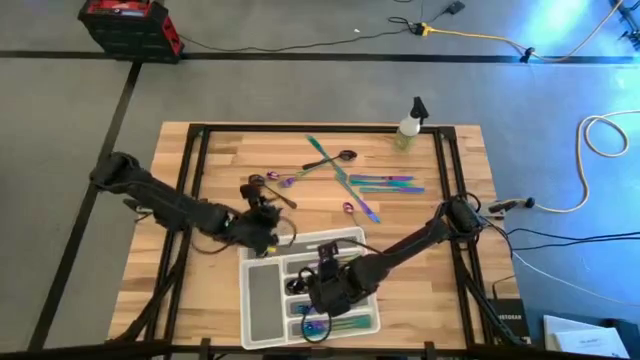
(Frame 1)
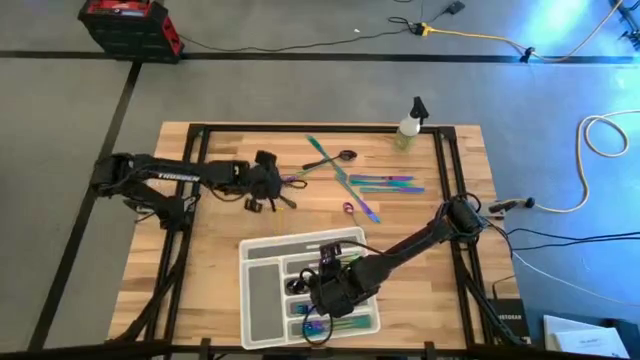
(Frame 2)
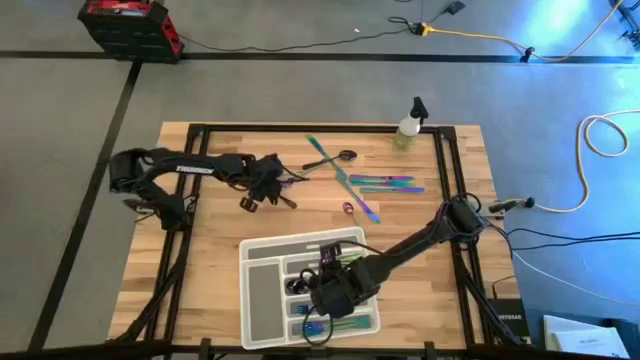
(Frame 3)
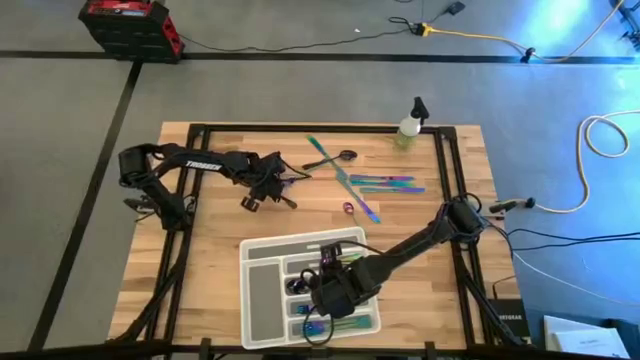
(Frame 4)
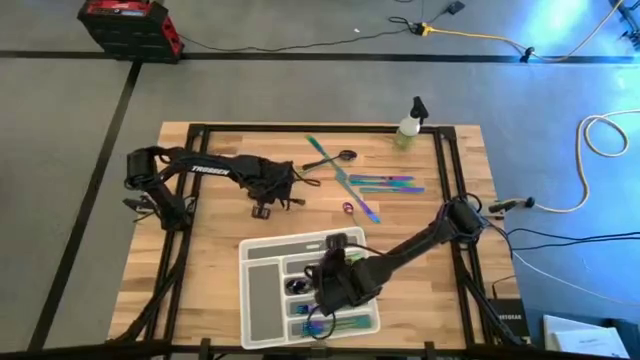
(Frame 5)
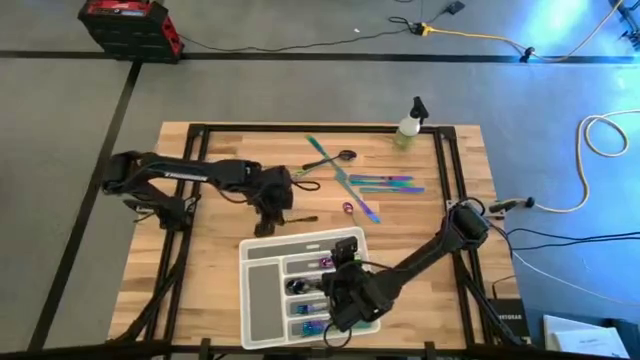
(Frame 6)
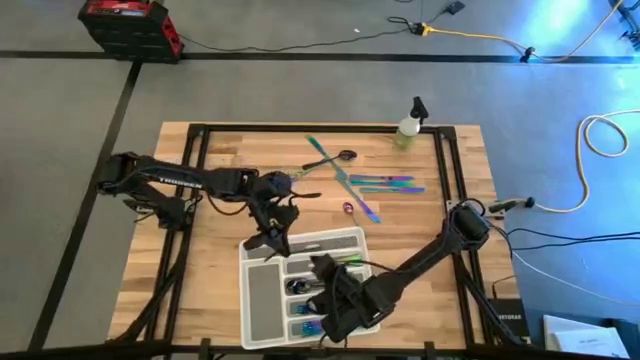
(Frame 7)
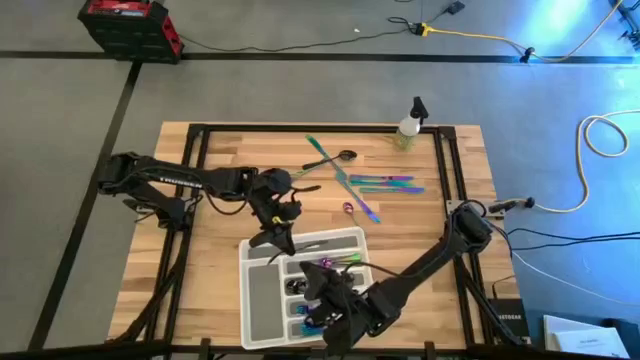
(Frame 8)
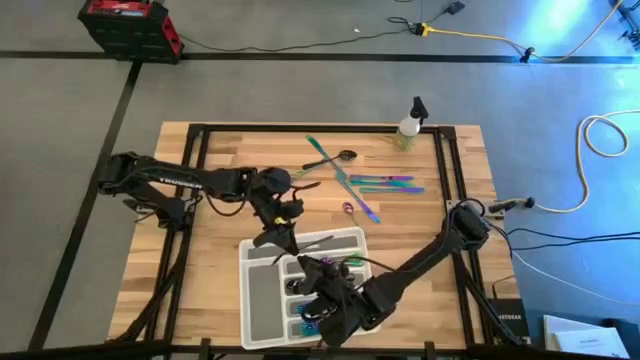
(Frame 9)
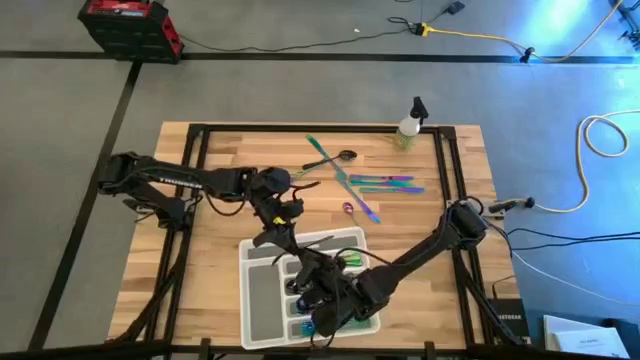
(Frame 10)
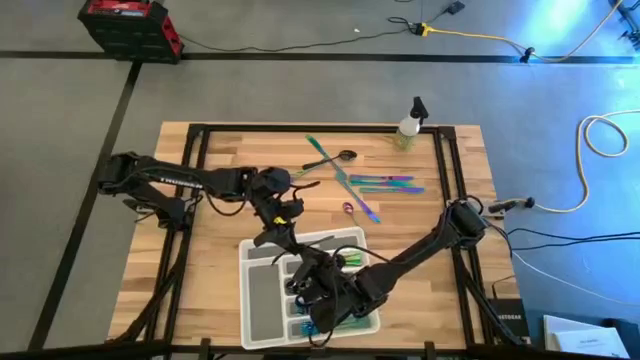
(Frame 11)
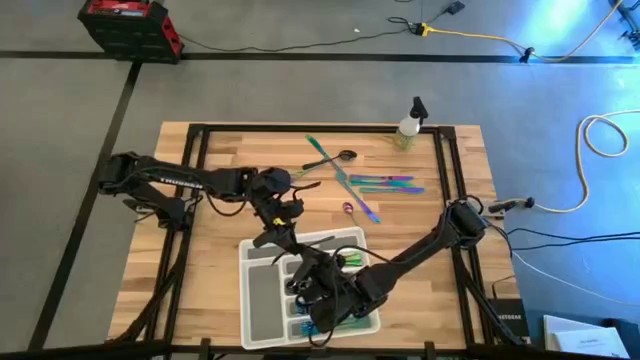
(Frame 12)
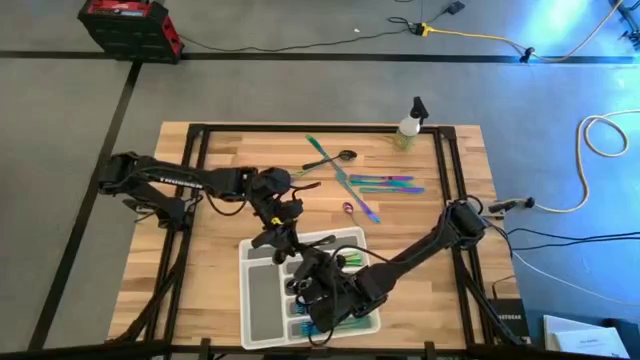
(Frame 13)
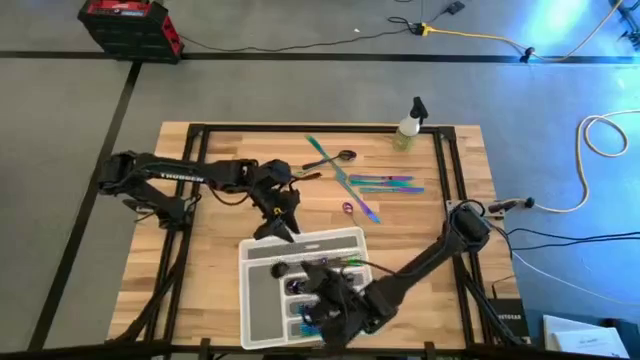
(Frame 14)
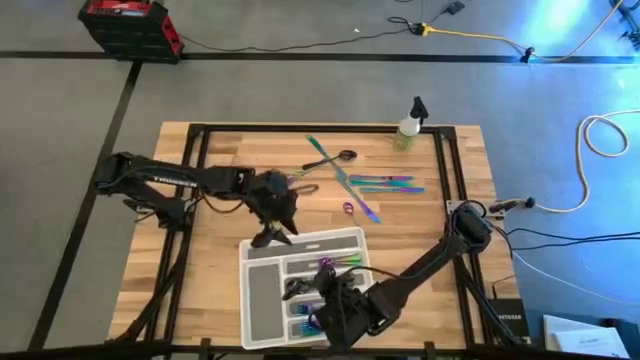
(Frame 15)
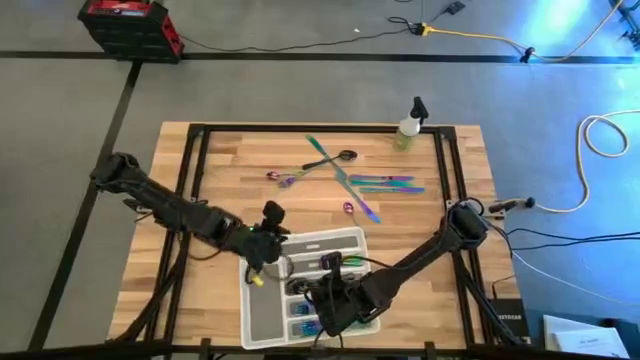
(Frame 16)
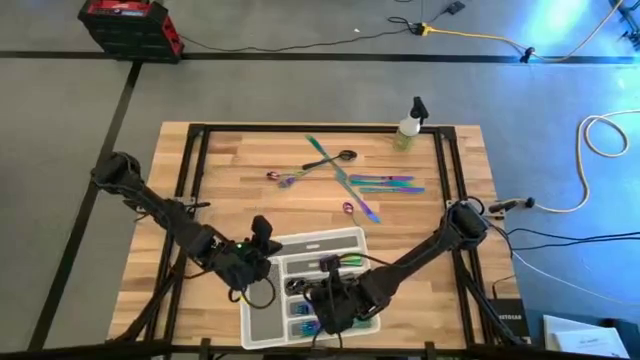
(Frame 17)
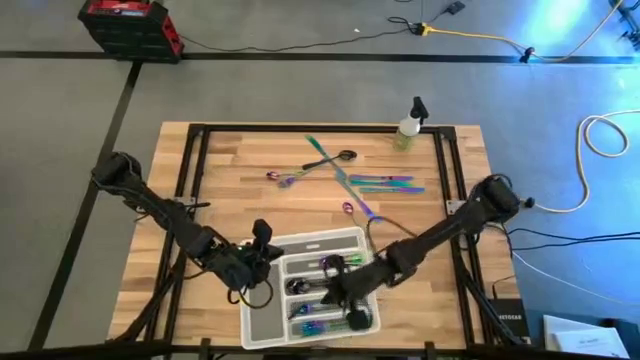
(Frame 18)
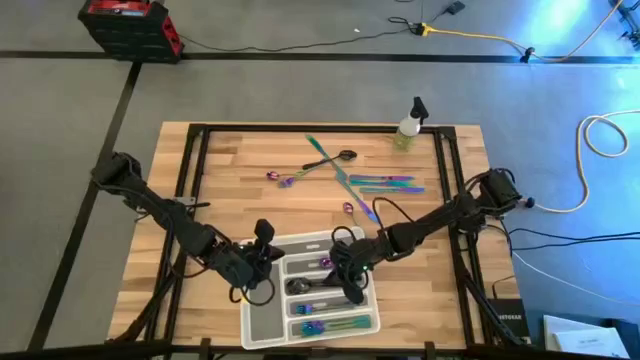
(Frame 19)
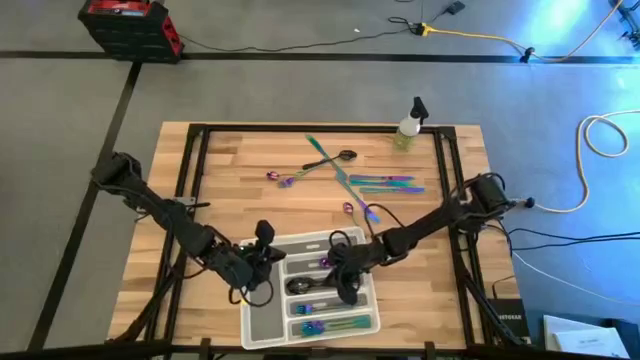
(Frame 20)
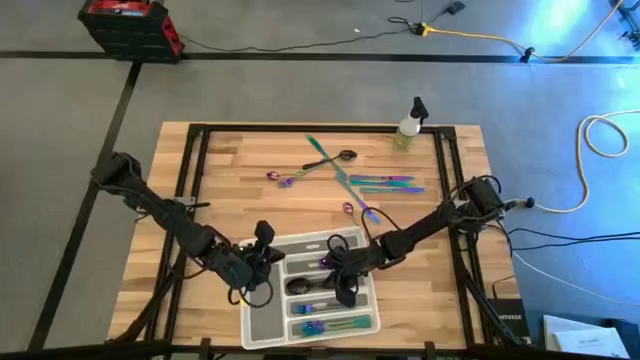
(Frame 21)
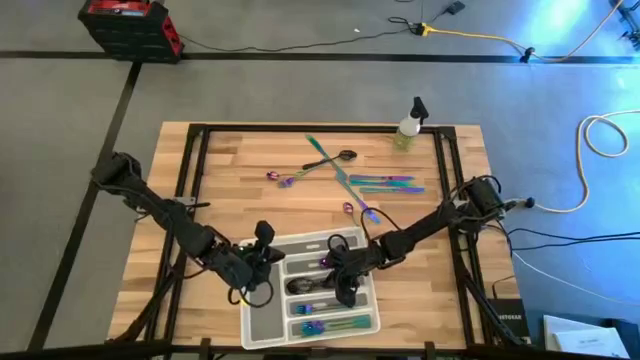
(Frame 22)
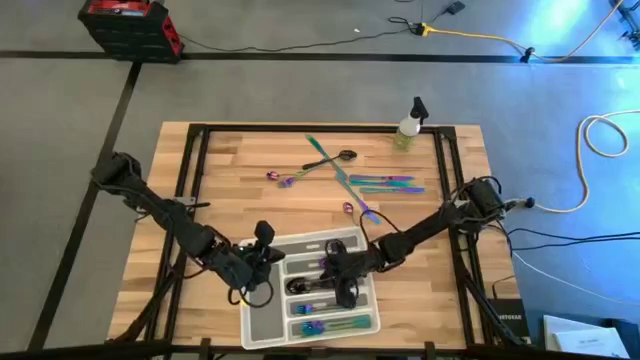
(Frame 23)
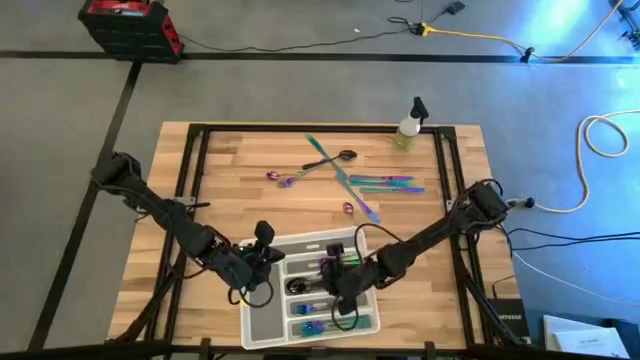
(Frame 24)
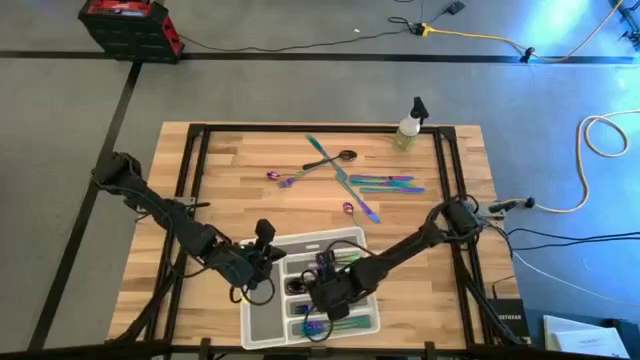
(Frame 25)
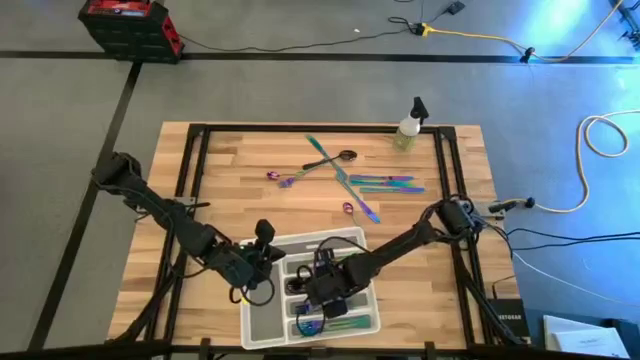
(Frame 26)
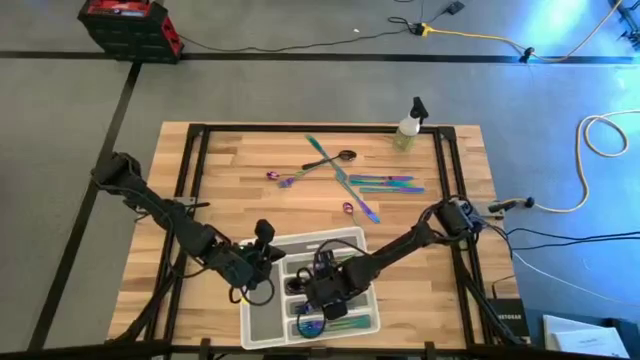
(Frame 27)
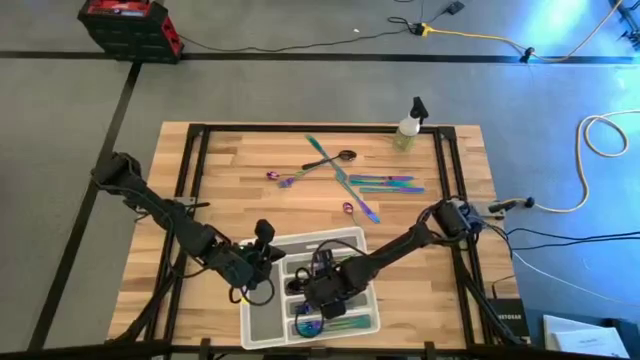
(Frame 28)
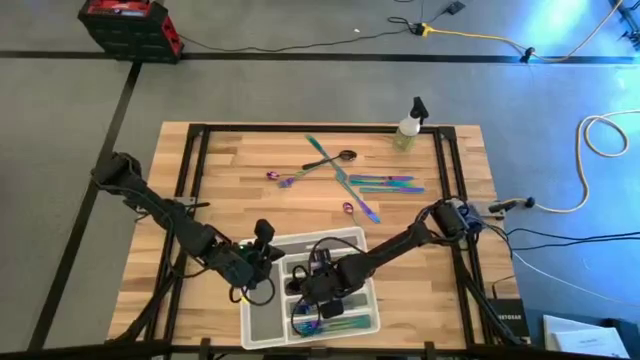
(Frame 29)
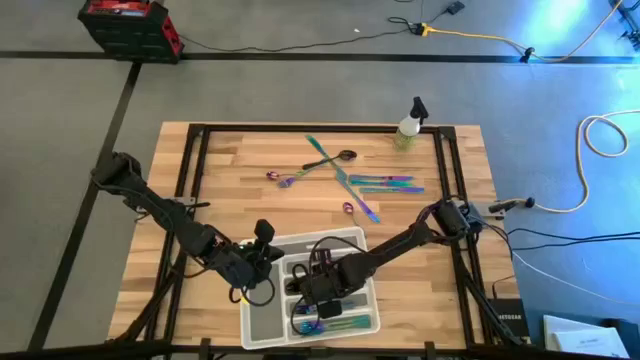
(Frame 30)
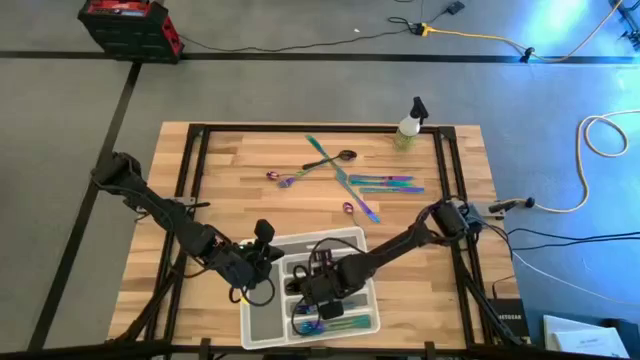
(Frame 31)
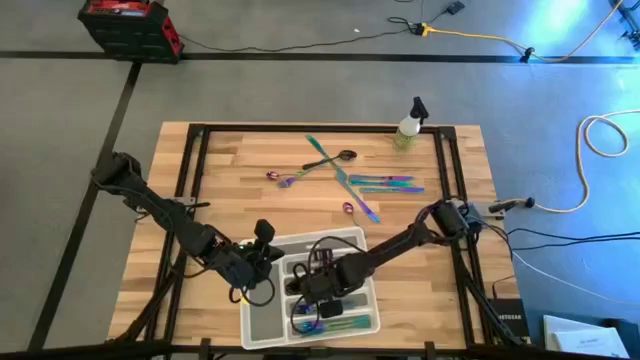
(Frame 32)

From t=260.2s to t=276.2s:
Task: Sort silverware
Put the black spoon into the white silverware tray

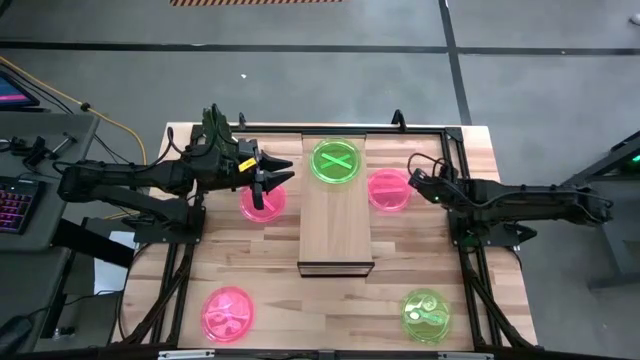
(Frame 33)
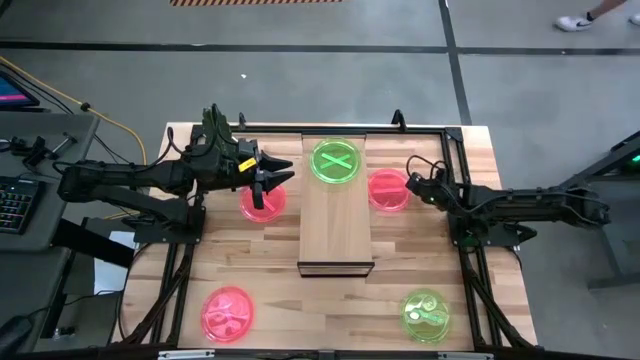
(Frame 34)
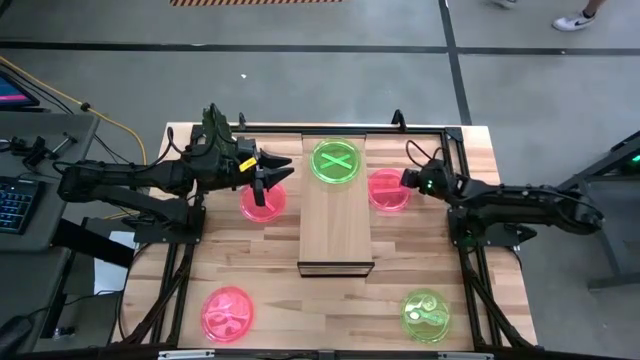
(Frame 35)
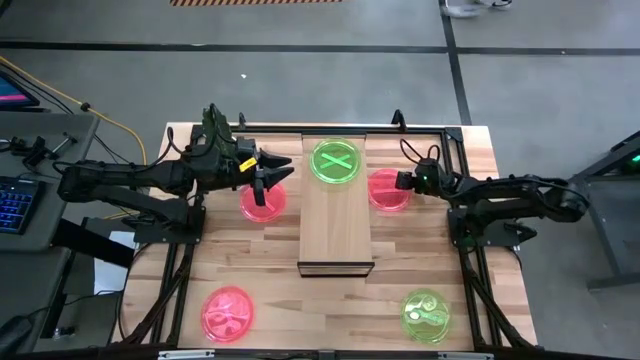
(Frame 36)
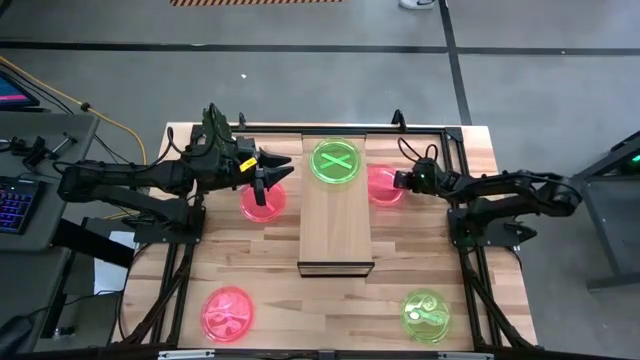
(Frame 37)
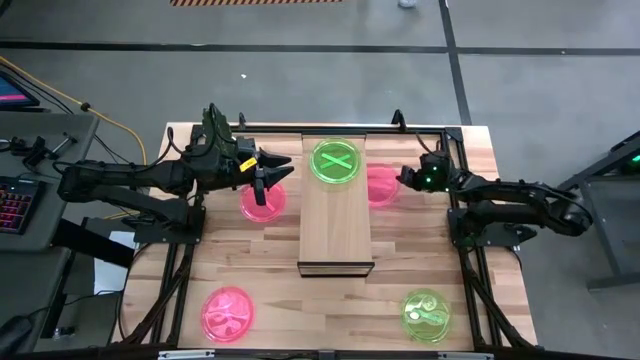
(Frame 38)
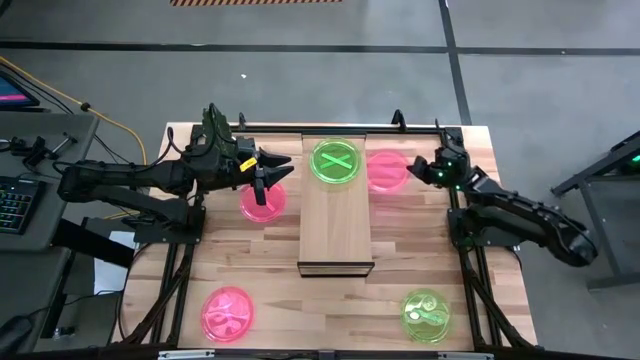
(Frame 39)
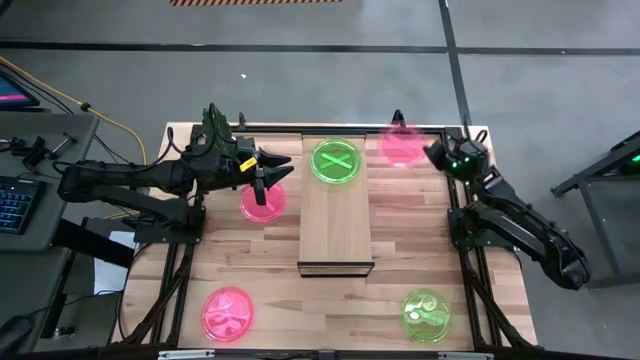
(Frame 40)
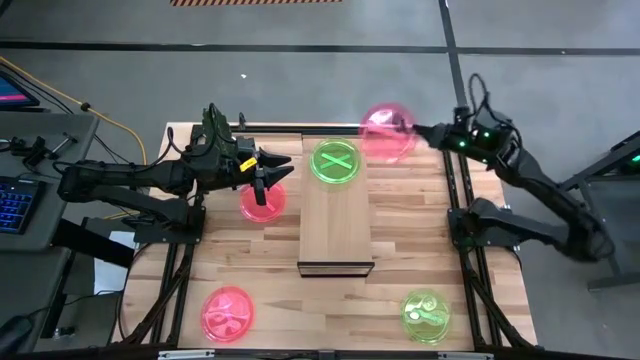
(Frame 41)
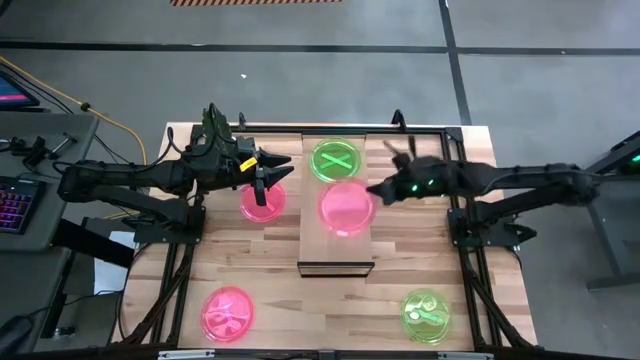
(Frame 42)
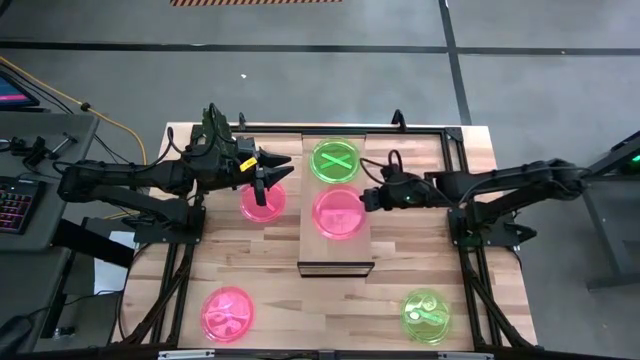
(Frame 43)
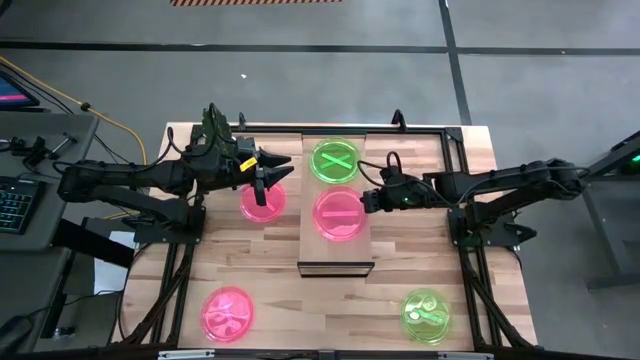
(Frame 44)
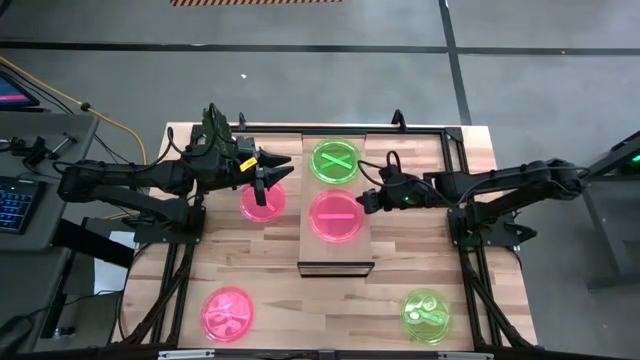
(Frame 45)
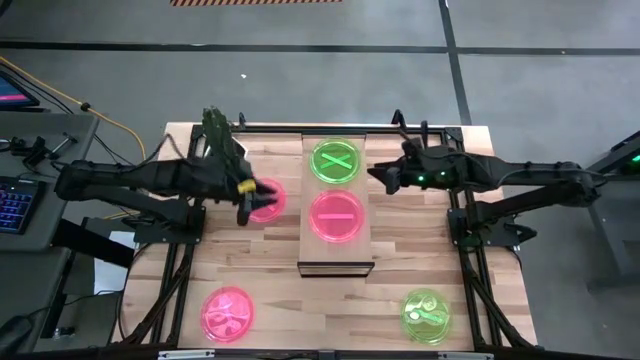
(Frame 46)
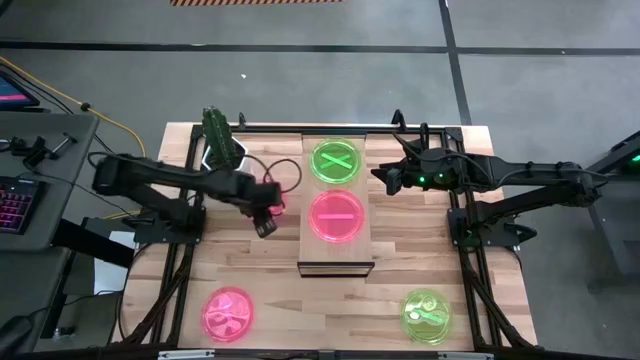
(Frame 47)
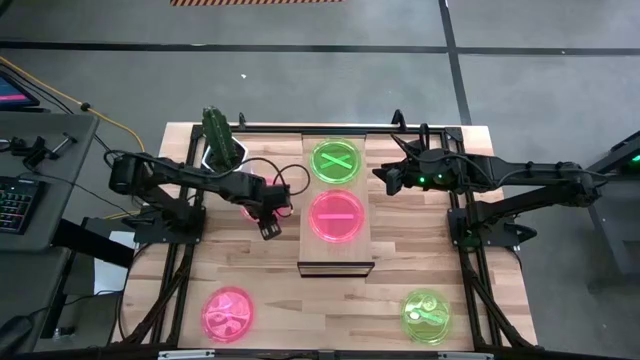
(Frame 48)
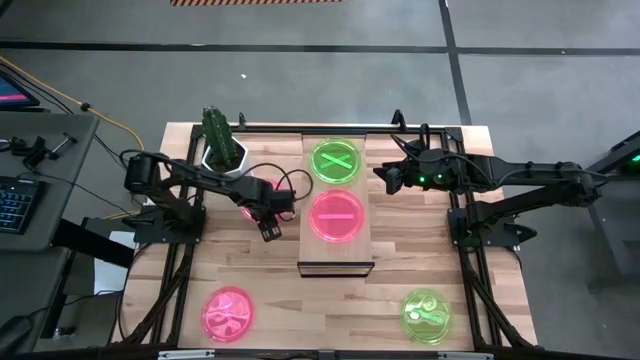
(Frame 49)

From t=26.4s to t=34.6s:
Task: Place and stack plates onto a shelf
Put the top right pink plate on the shelf
